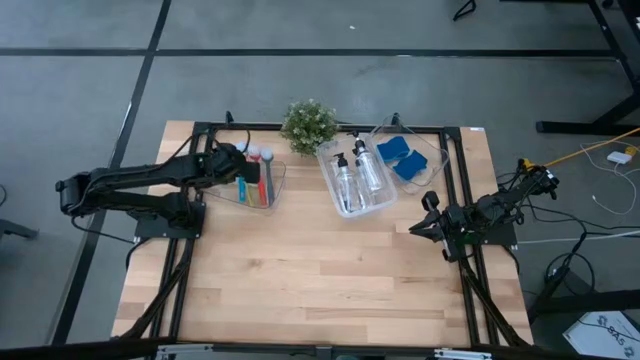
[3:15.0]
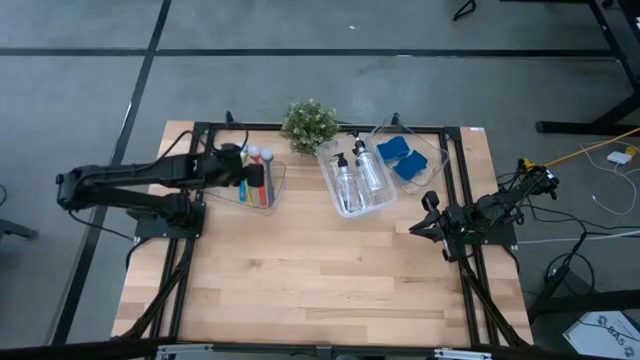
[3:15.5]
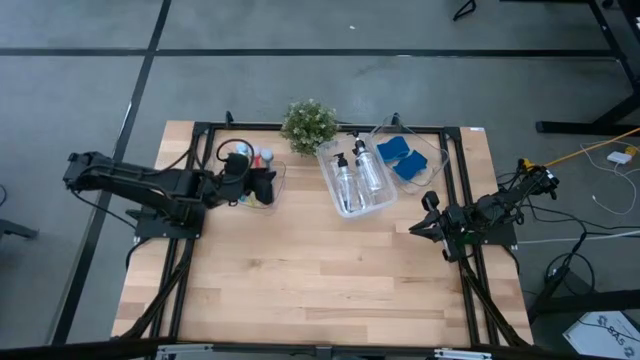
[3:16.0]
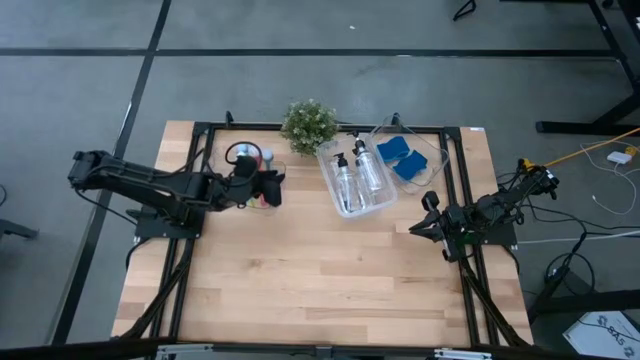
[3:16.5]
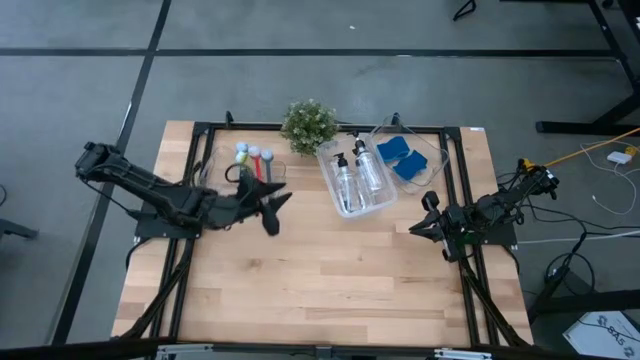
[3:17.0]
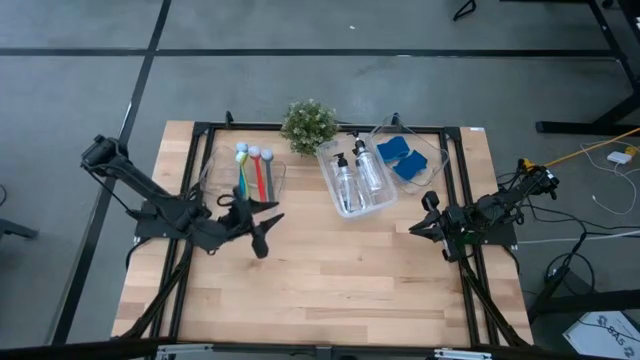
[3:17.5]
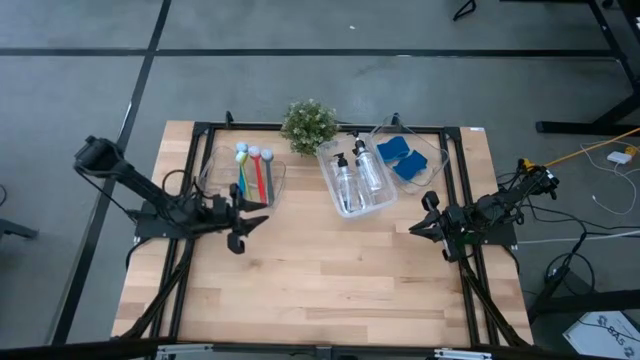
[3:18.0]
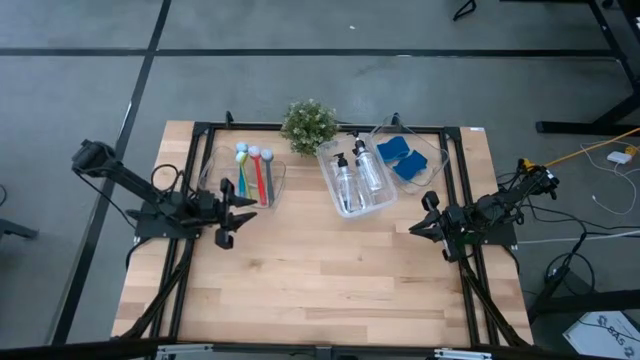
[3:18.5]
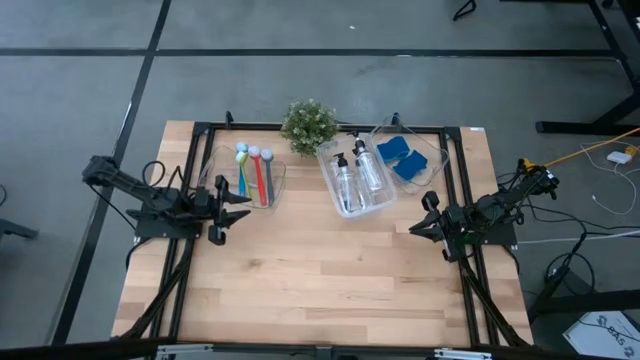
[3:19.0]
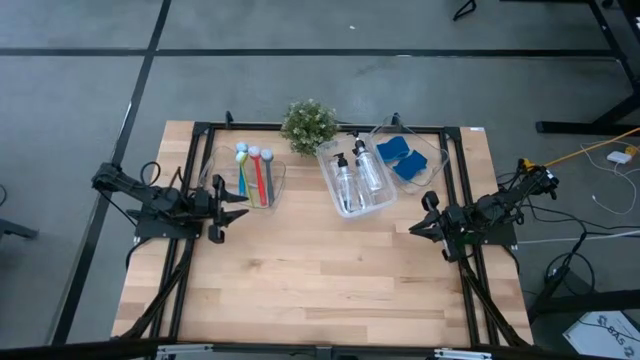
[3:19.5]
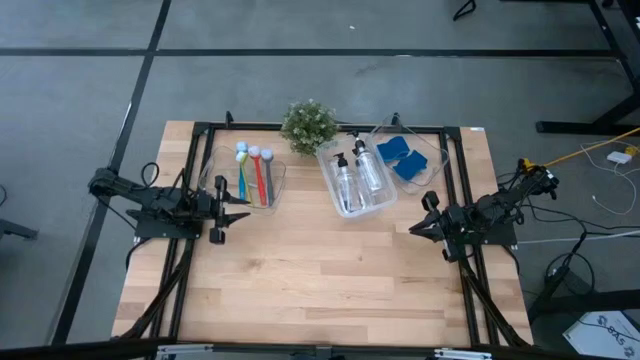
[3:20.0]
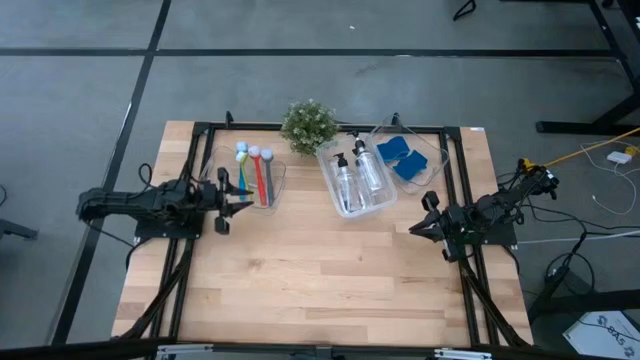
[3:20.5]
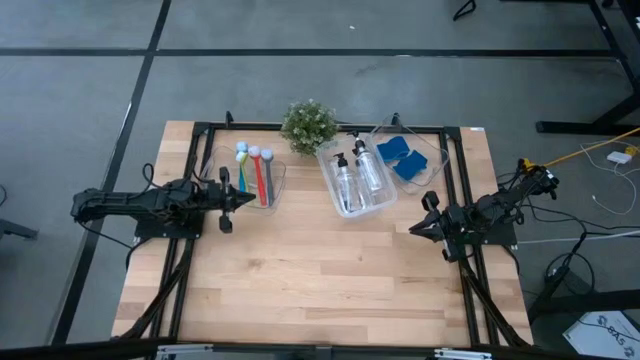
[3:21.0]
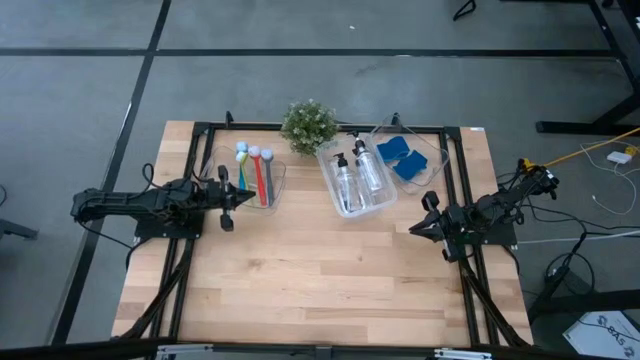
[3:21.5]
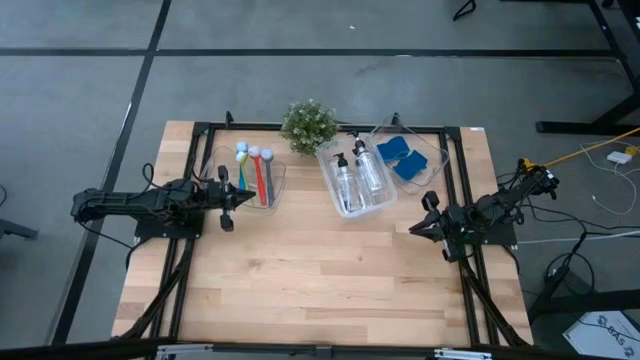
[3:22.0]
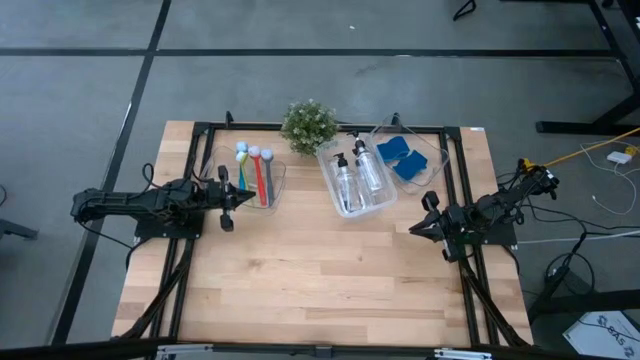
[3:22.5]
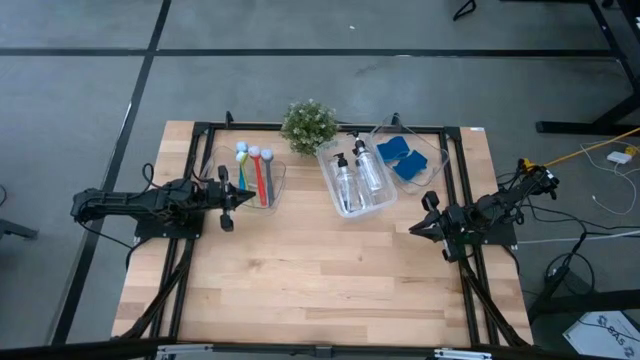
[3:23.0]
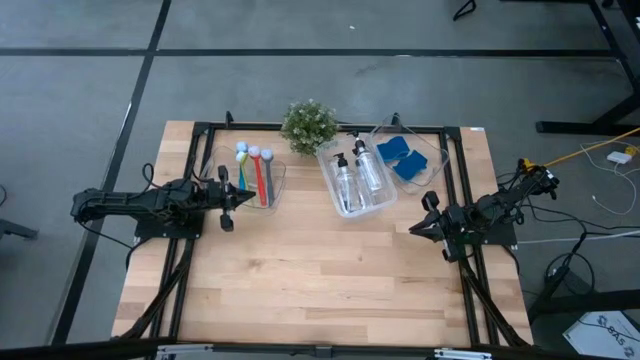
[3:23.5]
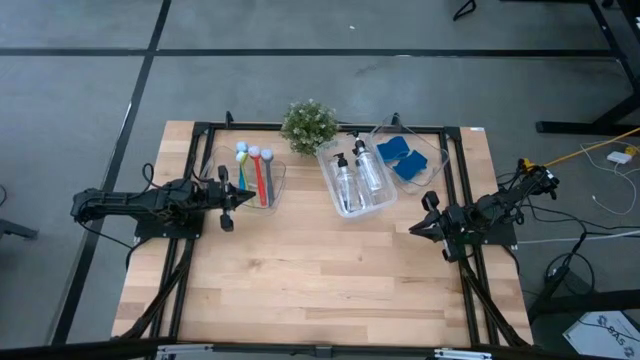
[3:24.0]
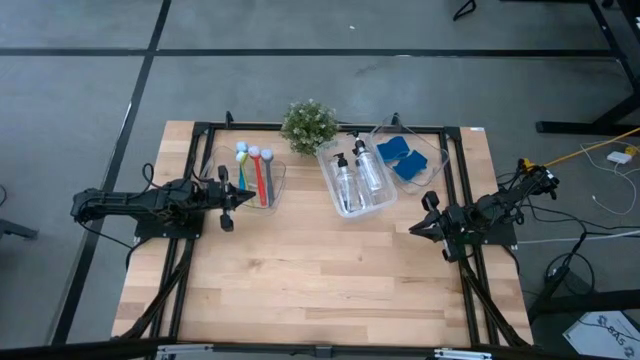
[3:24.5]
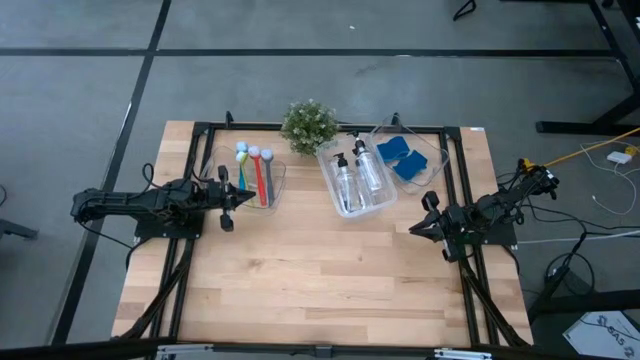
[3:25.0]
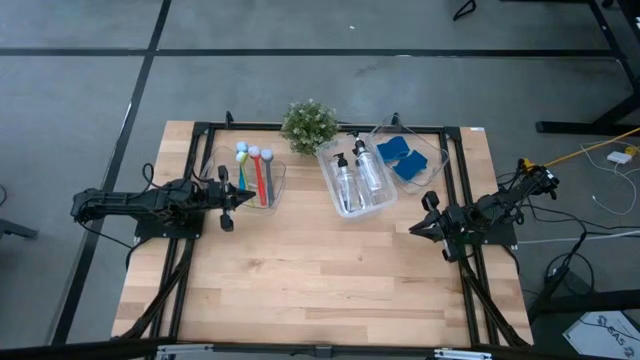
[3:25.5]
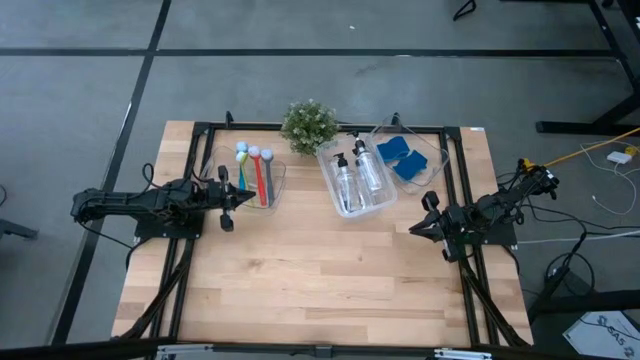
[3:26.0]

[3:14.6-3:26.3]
Task: Pick & Place Kitchen Sink Supplies
Return to Home Position

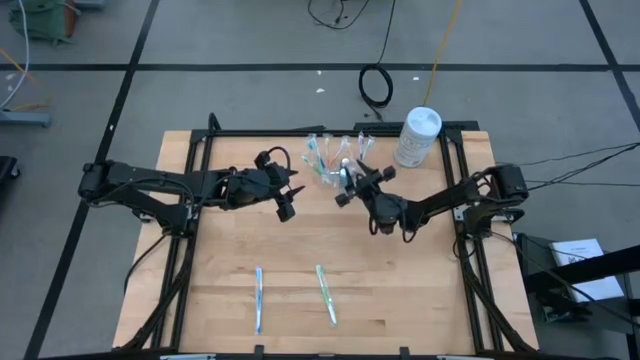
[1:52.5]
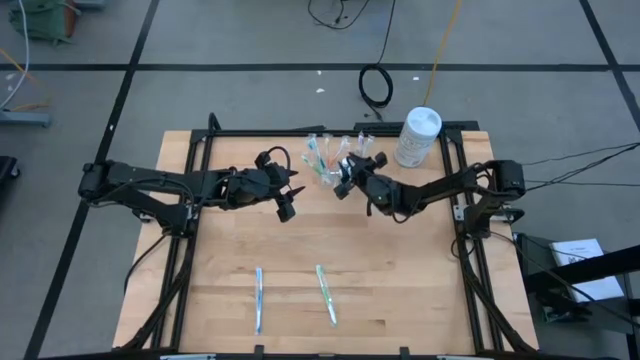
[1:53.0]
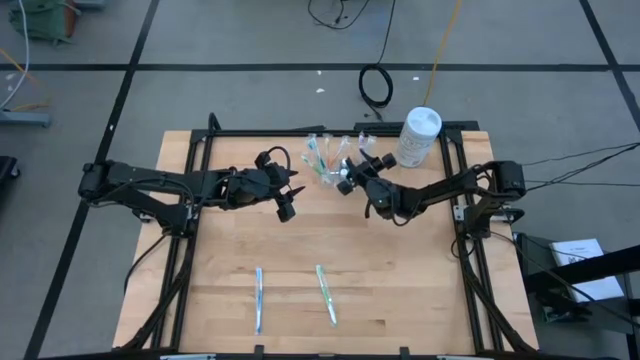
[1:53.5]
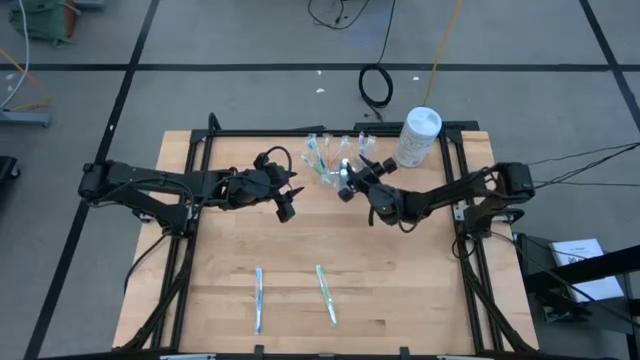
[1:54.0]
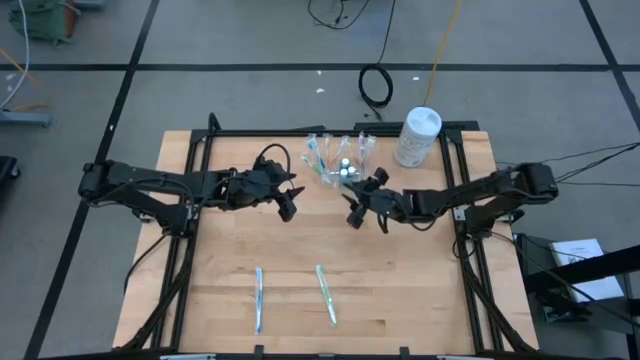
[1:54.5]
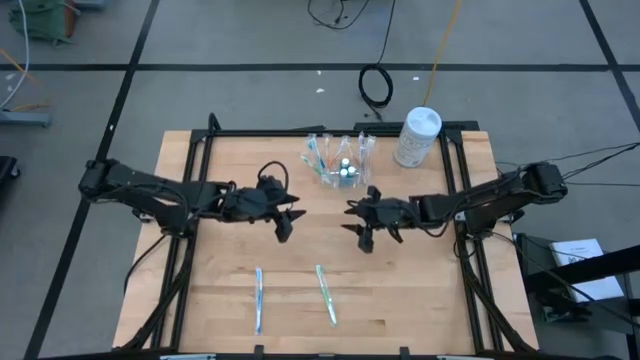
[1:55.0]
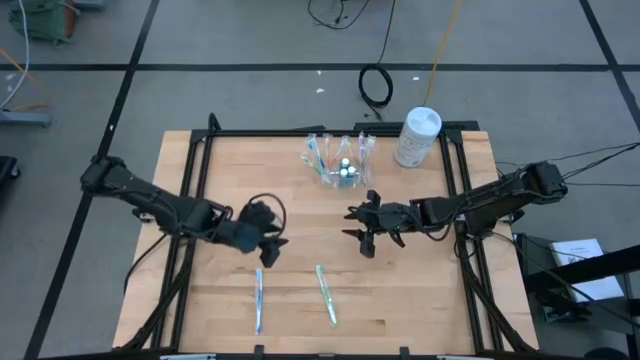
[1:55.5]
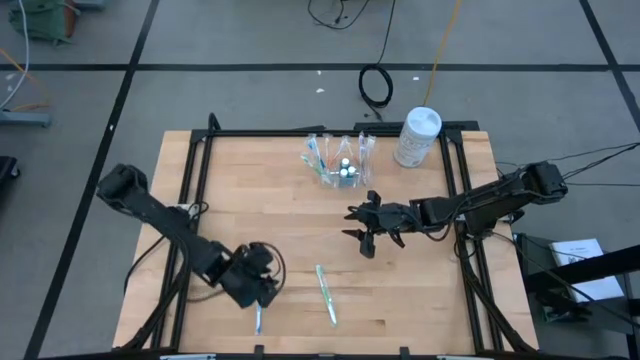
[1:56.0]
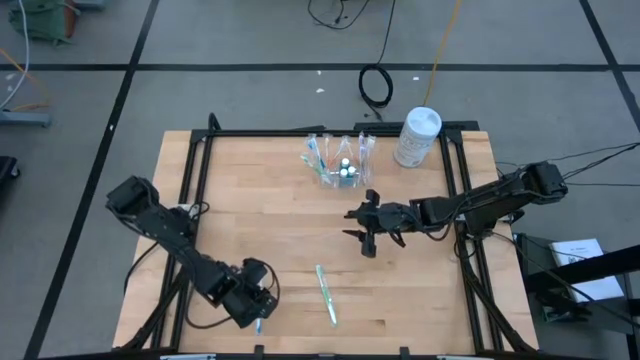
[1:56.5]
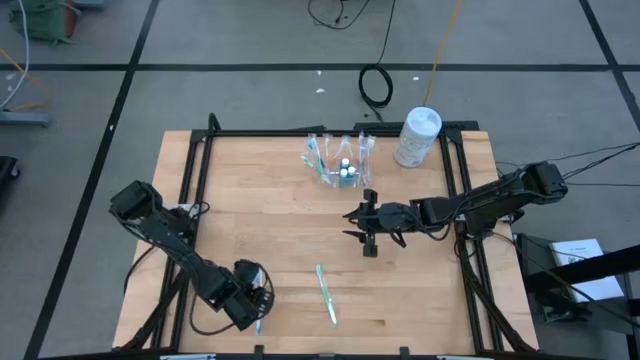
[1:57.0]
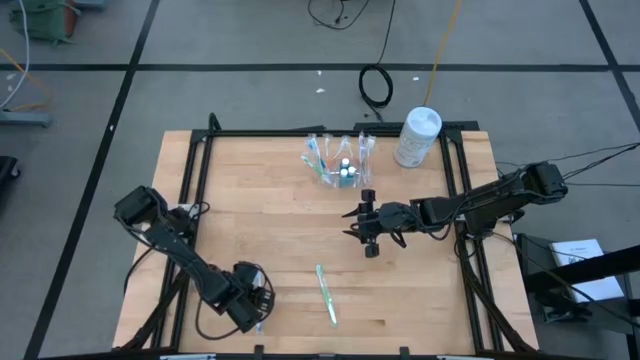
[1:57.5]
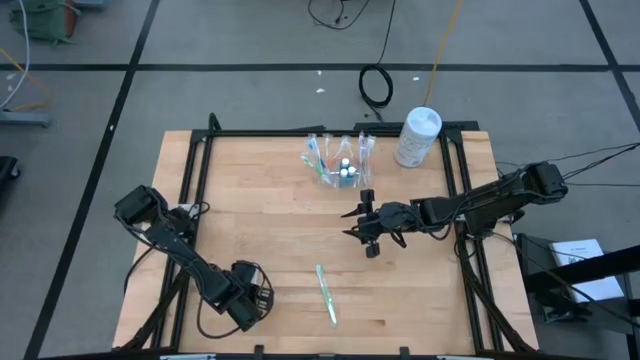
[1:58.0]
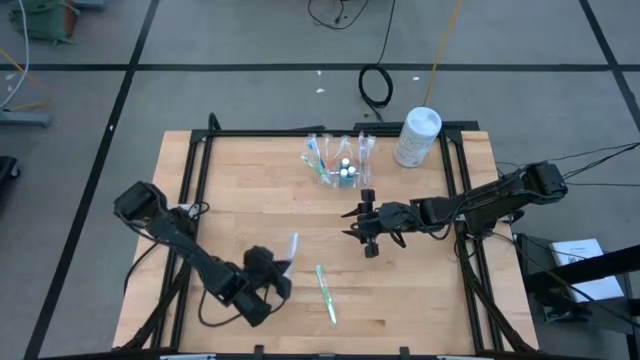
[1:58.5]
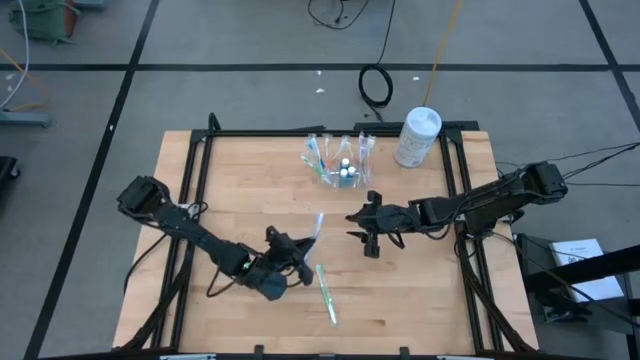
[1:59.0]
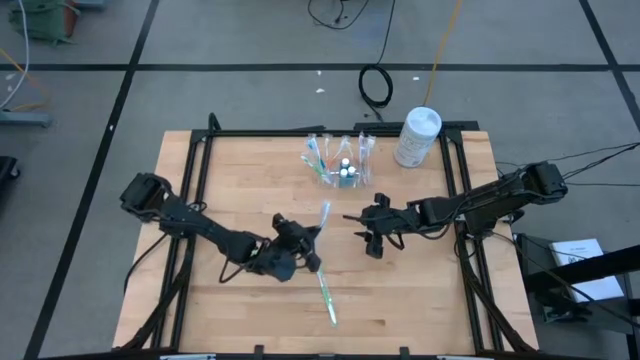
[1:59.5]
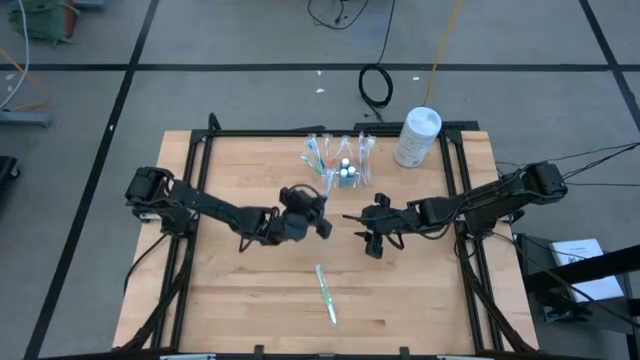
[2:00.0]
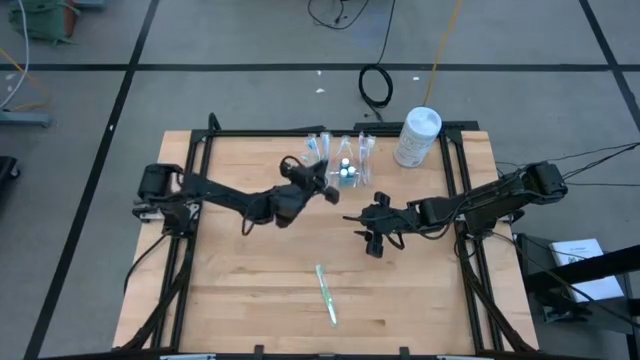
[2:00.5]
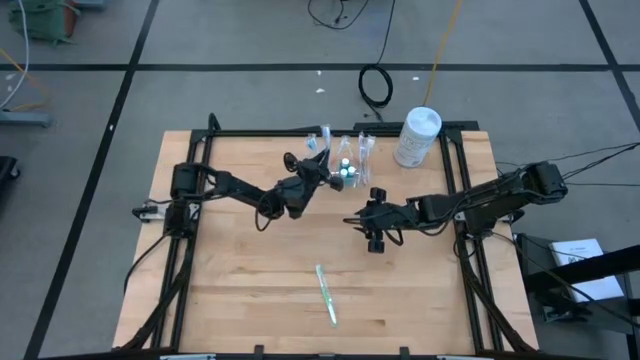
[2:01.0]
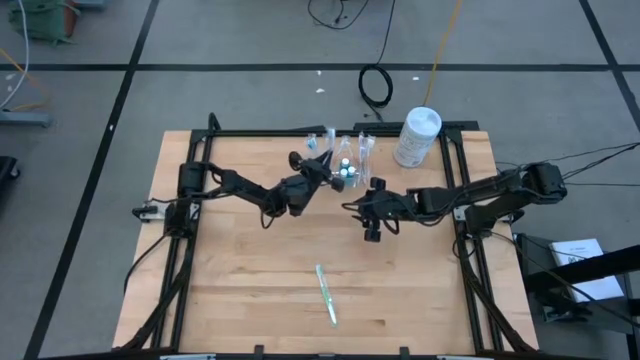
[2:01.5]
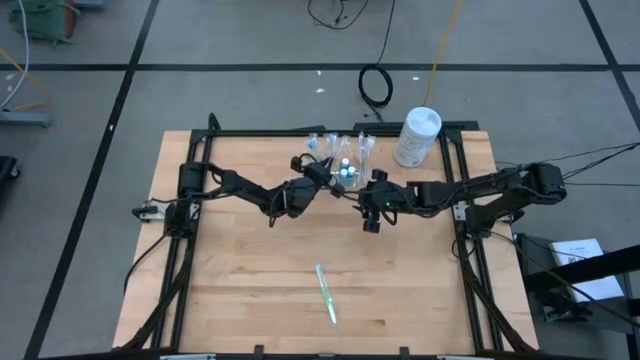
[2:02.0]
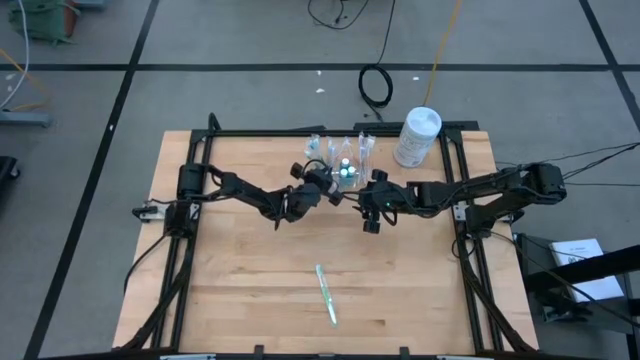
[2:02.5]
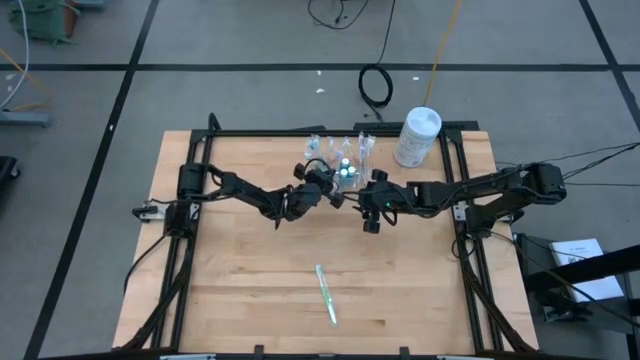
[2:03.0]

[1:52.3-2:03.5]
Task: Pick & Place toothbrushing station
Put the blue toothbrush into the transparent organizer
